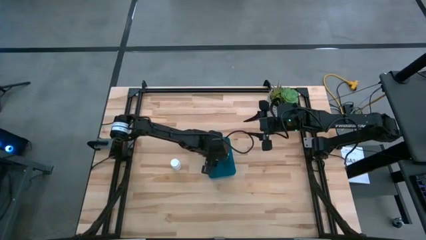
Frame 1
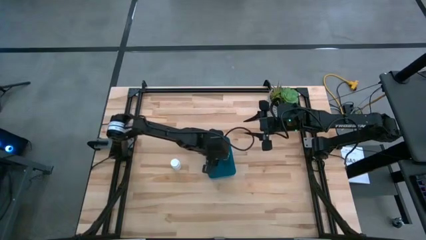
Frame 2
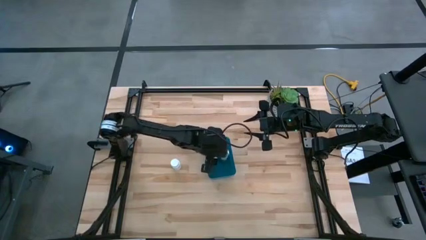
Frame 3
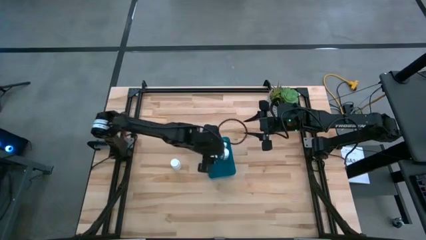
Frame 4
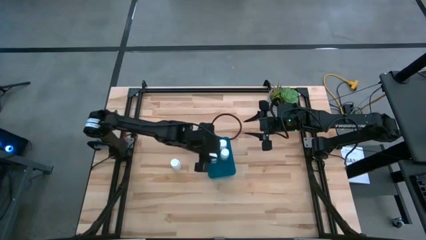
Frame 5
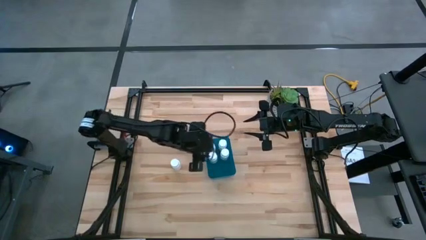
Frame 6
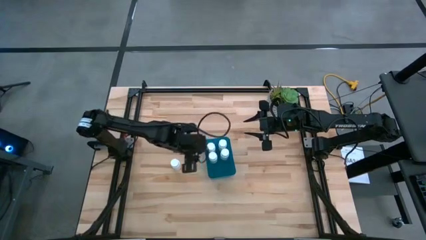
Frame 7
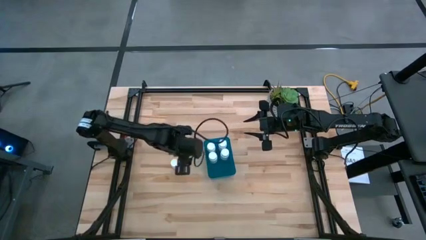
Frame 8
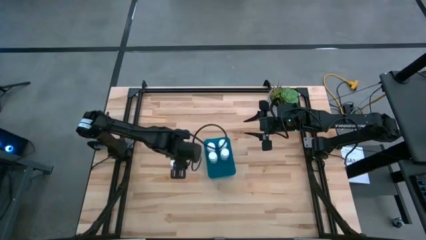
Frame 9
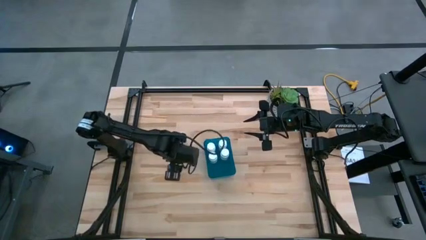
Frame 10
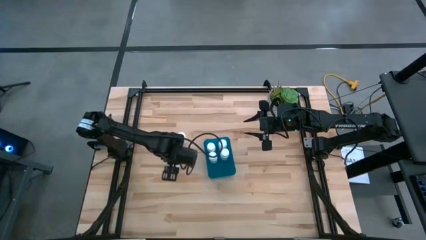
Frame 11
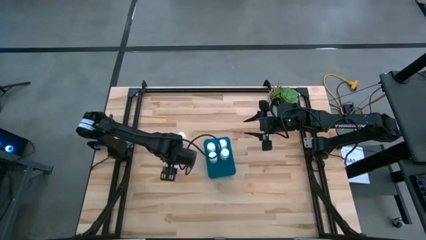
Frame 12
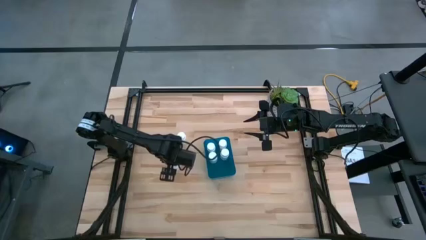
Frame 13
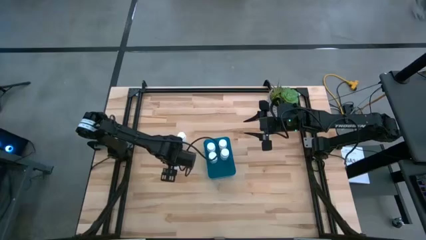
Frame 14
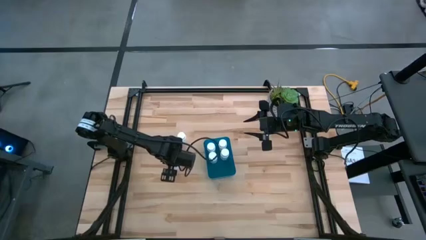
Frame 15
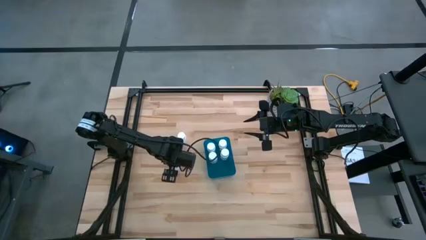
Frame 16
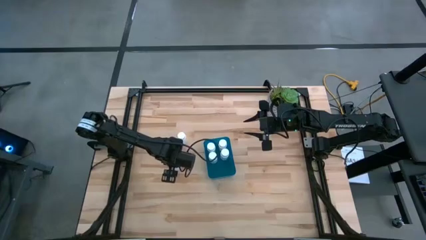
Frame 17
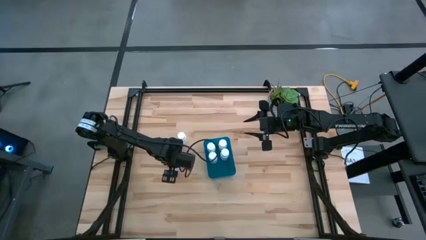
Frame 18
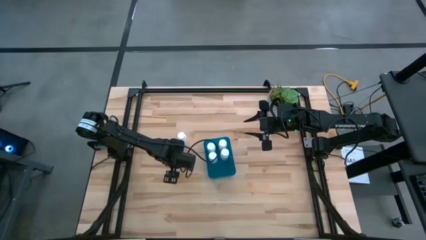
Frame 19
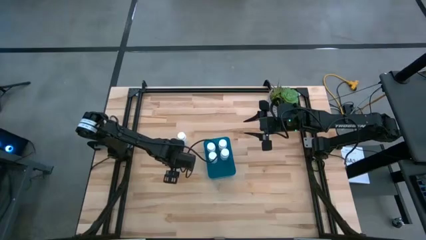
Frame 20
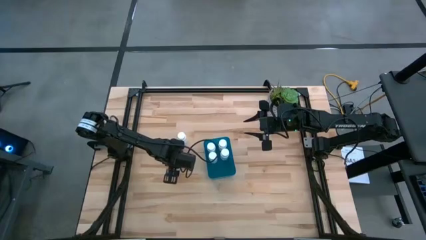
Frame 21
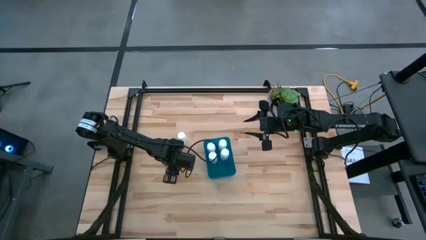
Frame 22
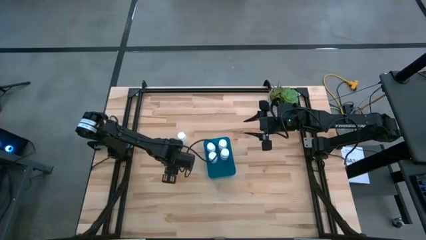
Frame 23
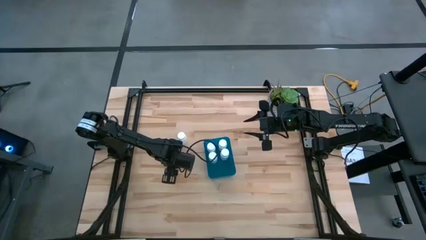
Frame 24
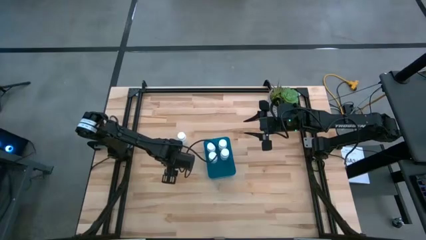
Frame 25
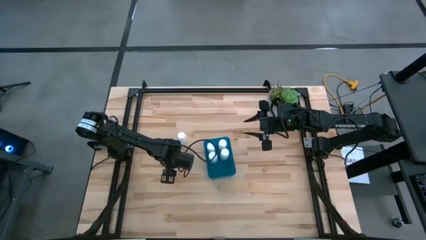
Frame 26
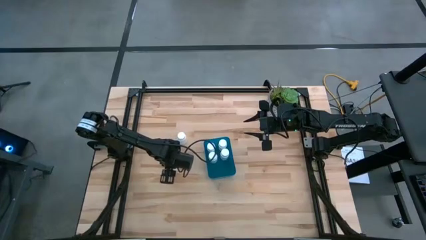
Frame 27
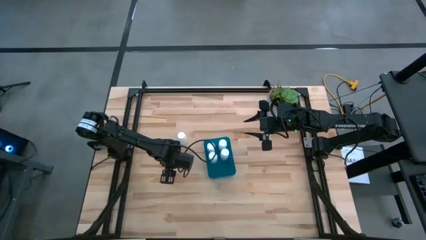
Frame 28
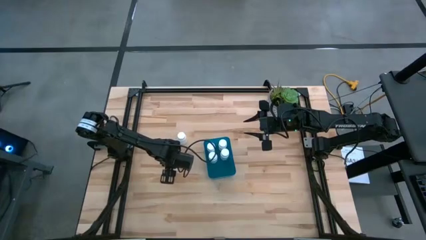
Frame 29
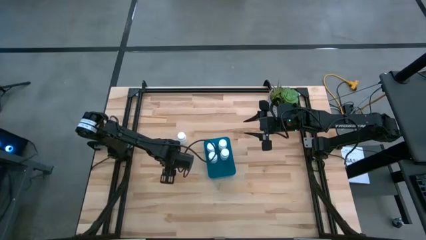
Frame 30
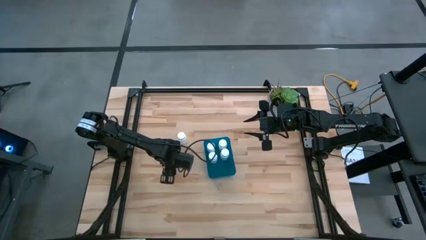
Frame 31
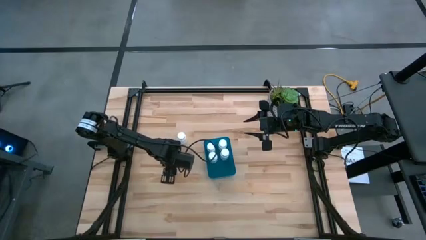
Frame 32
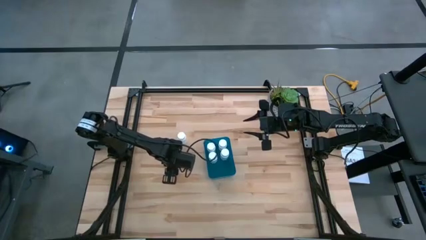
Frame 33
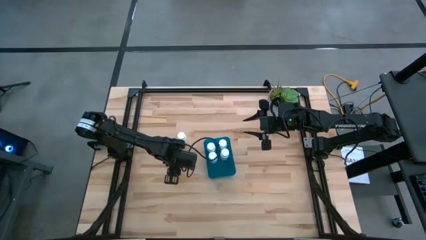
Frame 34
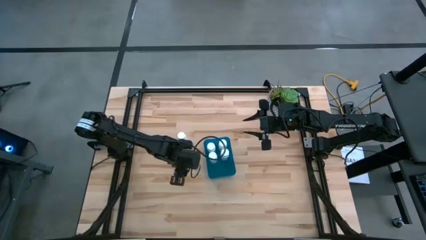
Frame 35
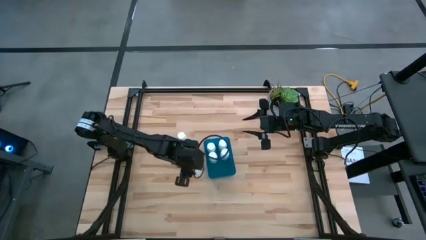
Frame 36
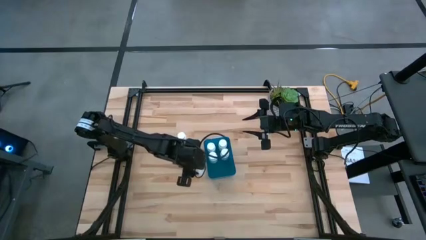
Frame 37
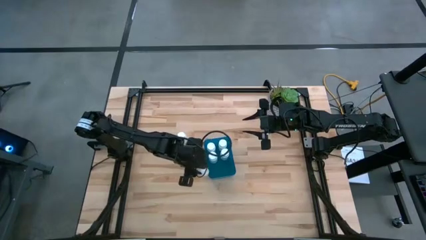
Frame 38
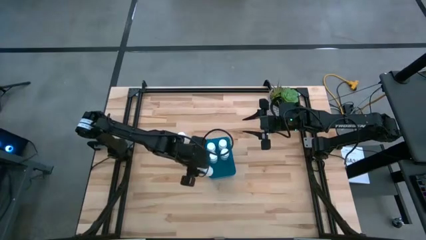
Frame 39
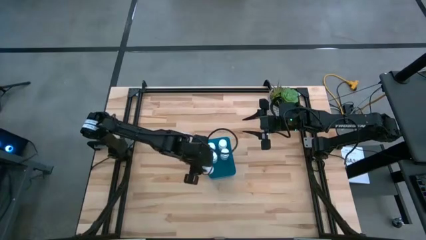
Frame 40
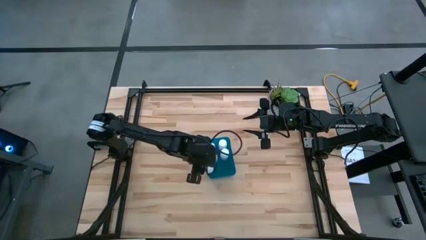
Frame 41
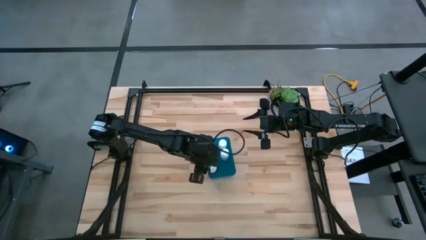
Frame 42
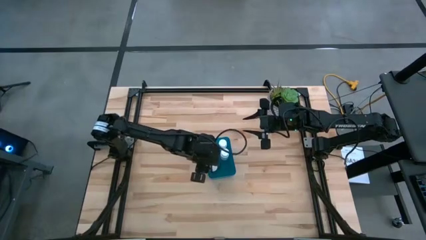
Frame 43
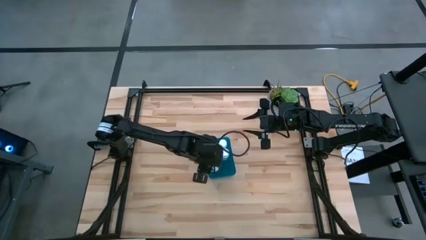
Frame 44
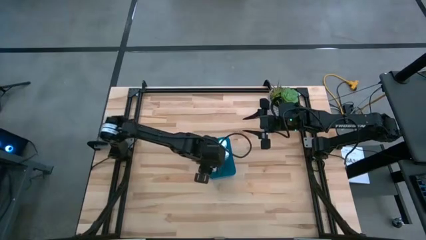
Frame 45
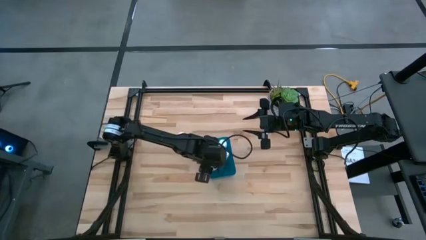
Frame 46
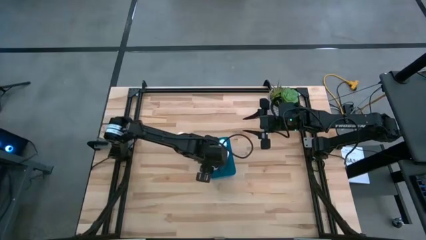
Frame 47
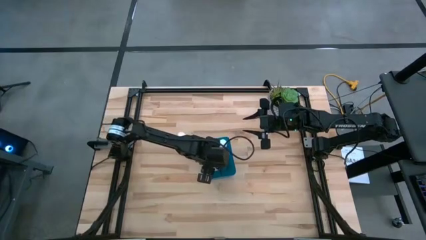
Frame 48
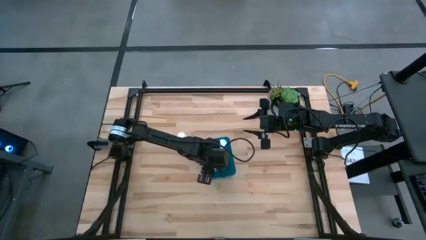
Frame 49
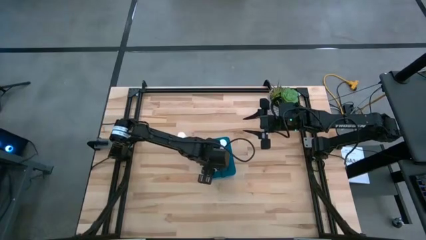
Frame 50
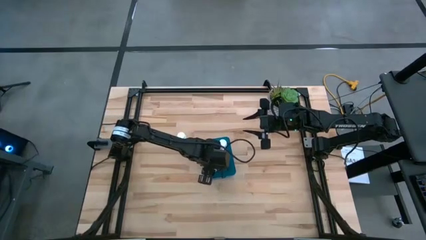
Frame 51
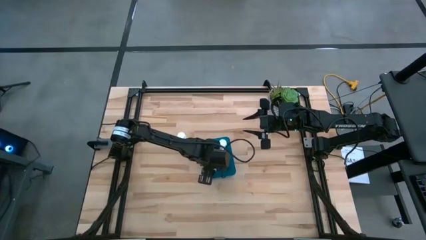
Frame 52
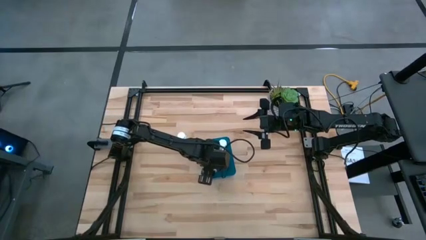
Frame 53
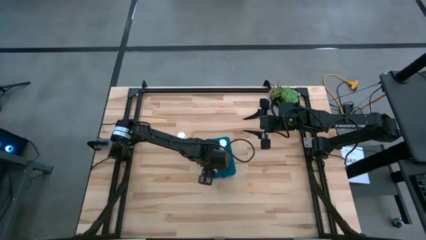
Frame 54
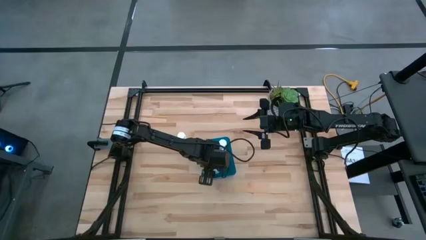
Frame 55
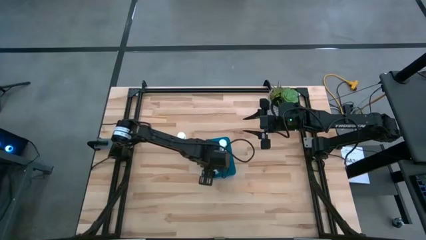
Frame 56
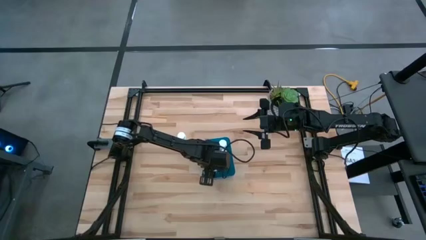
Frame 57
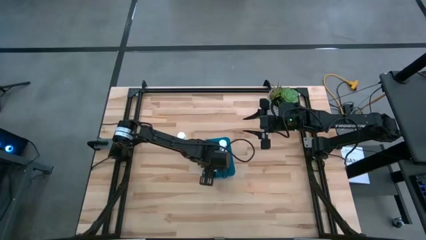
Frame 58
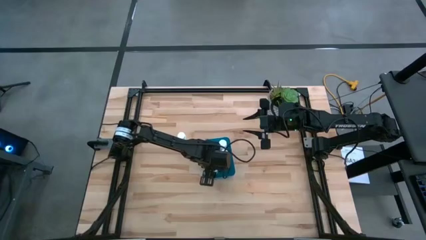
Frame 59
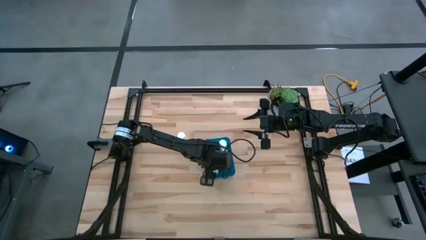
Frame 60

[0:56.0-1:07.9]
Task: Pick and place pill bottles into a basket
Put the white pill bottle into the blue bin
